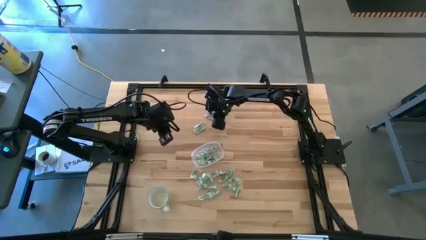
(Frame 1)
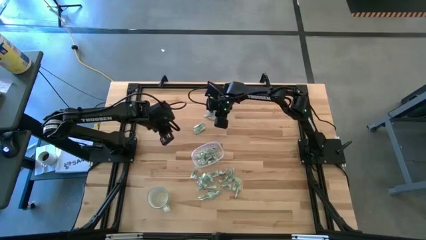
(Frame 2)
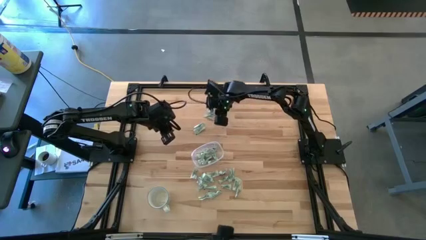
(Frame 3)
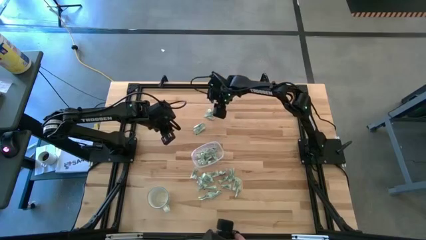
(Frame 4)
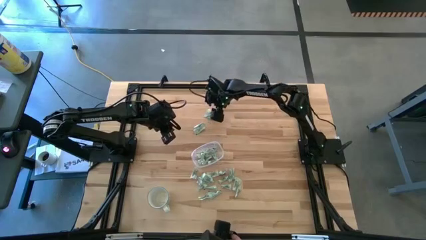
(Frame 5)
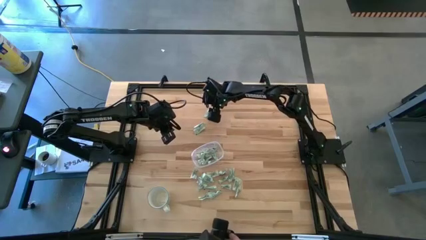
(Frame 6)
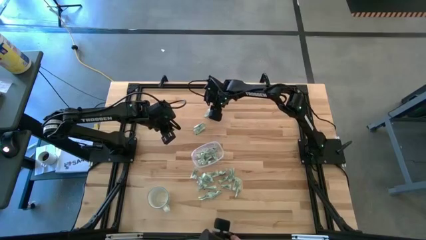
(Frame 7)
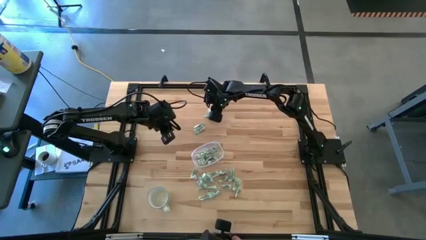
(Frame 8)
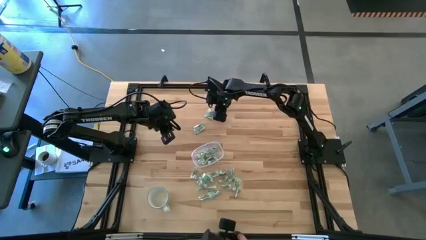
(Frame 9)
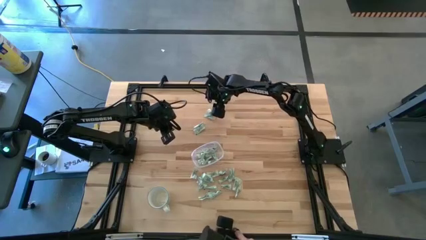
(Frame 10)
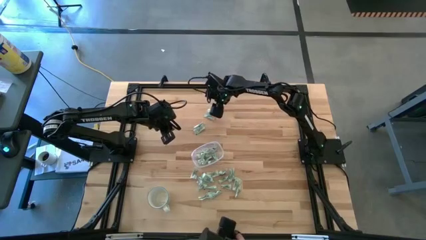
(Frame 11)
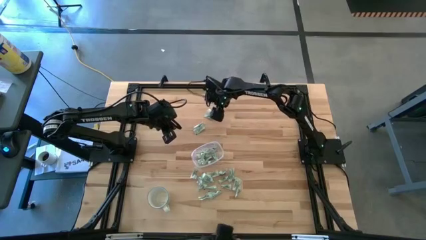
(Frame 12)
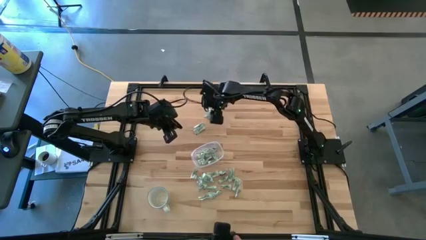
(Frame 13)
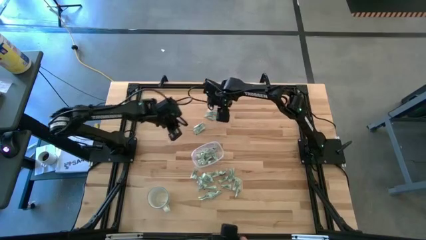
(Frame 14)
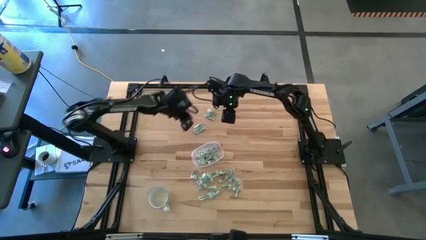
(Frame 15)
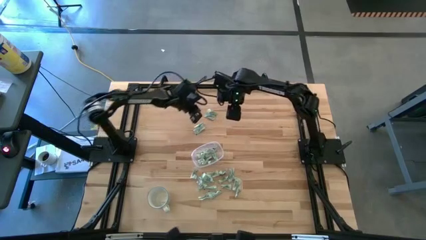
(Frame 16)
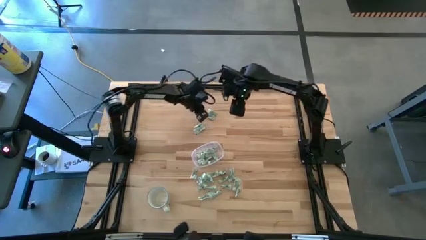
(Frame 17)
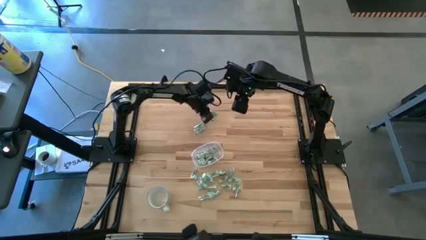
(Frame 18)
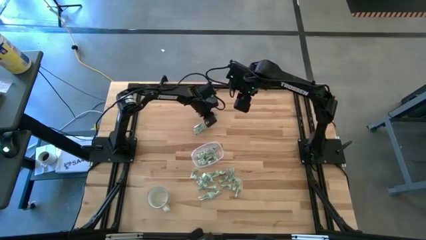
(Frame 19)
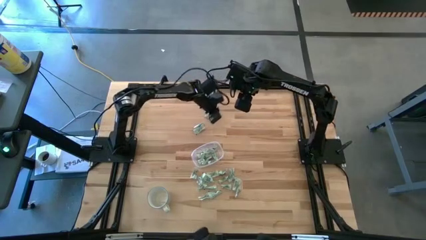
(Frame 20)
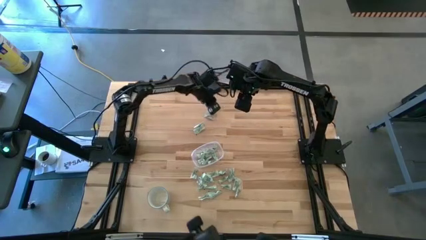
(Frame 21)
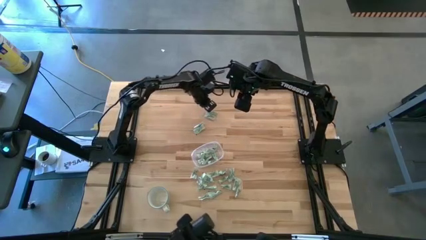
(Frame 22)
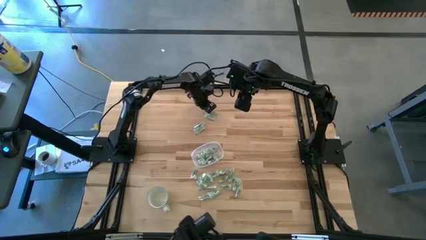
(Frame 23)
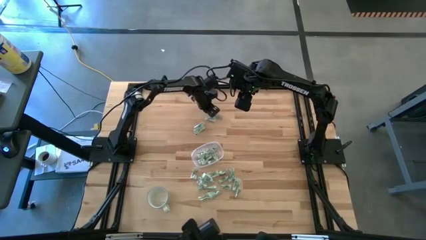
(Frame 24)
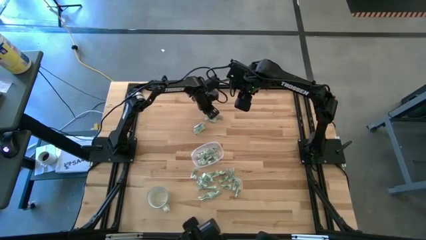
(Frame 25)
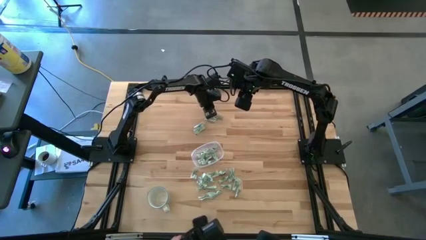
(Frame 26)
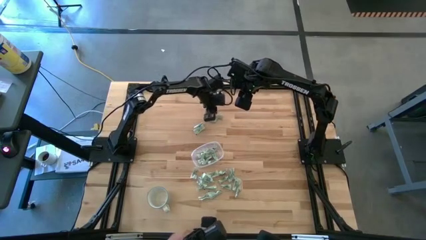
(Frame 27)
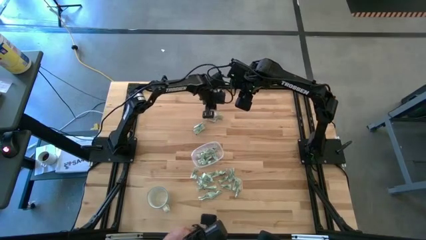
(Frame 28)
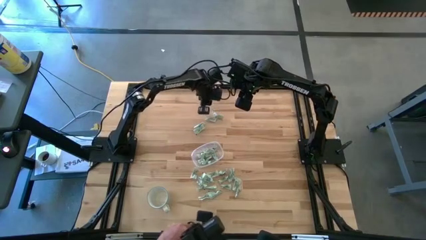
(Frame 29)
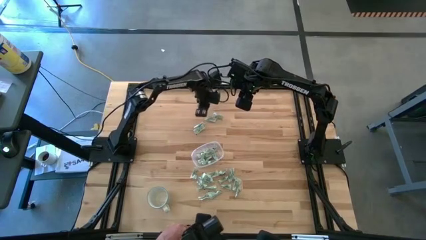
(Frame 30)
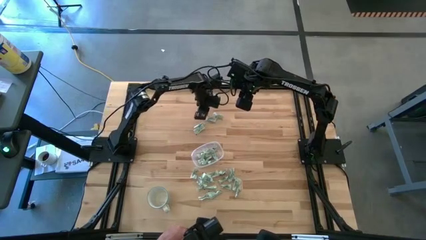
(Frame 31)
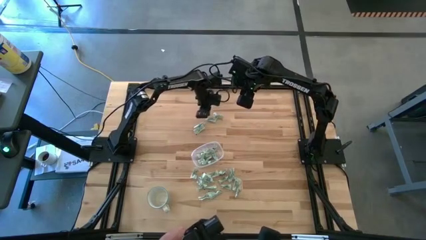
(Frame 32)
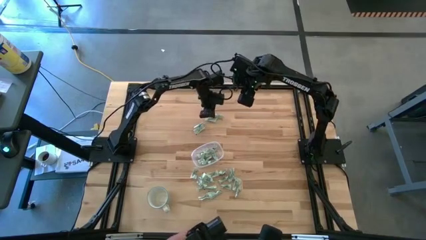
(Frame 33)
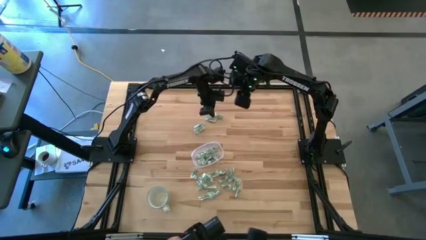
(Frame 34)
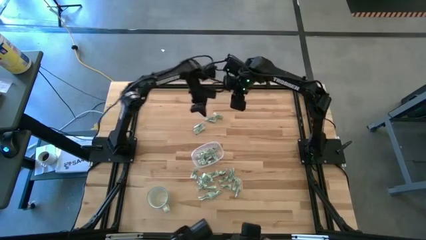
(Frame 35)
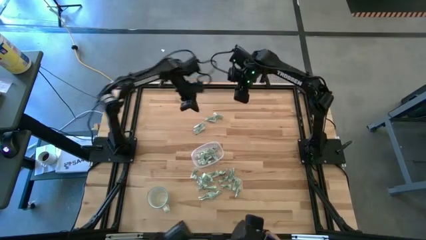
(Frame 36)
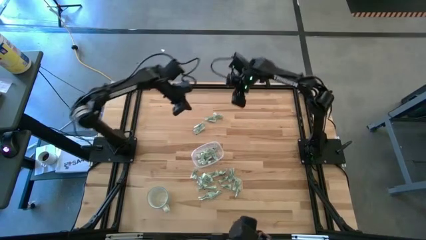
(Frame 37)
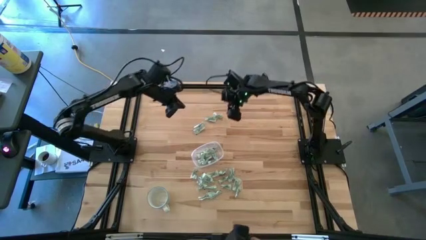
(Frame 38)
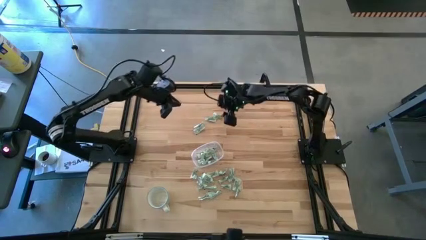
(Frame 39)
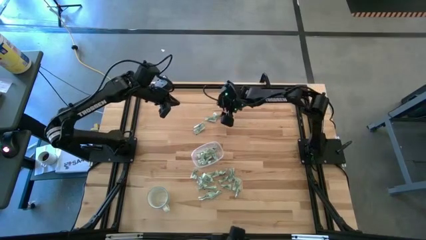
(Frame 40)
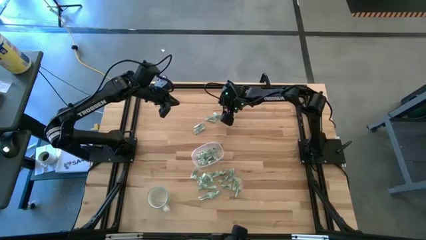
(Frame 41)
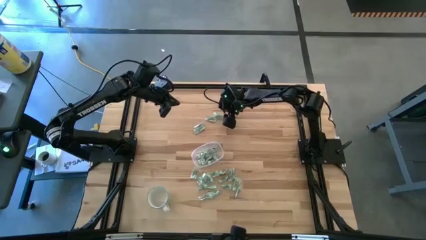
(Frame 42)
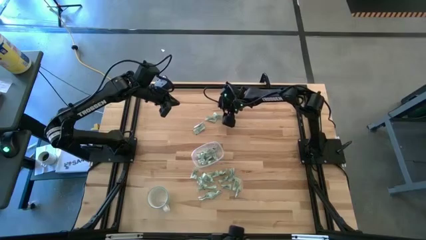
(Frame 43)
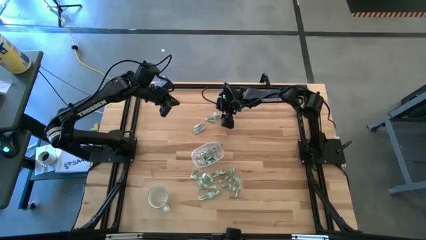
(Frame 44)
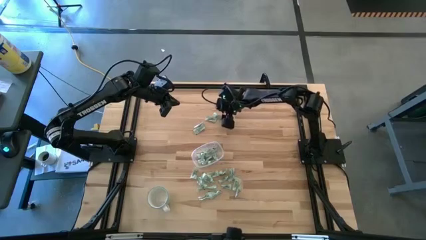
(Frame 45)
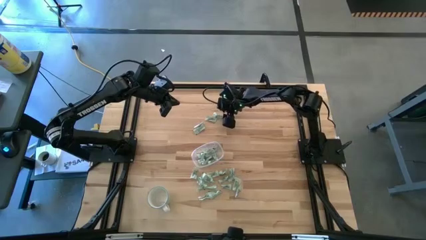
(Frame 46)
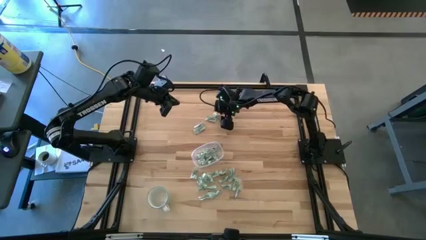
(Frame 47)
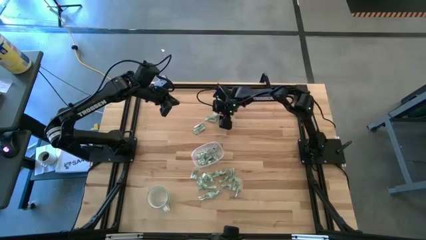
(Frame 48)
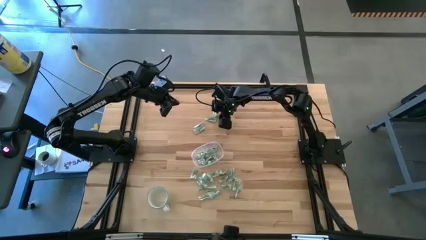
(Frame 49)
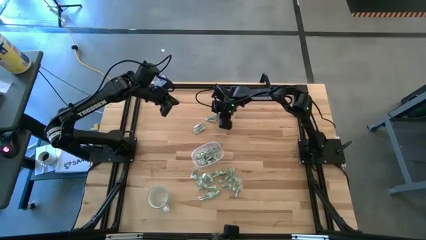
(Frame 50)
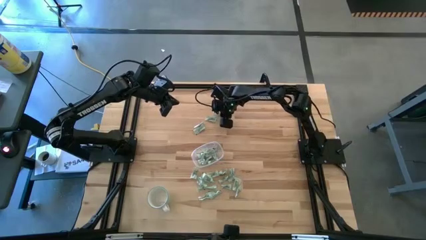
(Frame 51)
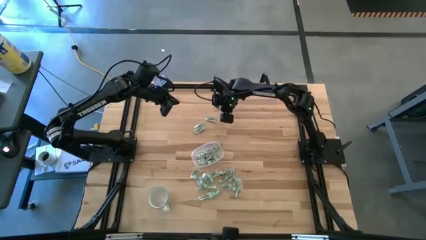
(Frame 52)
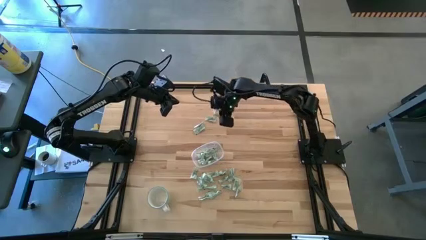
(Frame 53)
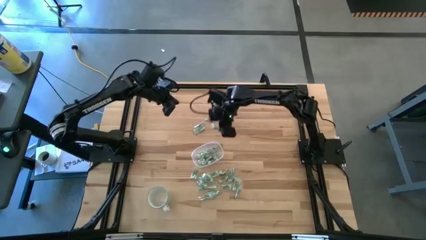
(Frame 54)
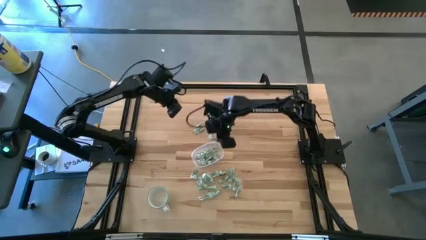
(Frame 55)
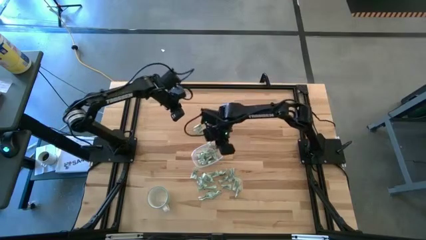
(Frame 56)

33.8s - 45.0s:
Task: Pick and place Stevia / Truvia into bins
Put the stevia packet into the transparent container

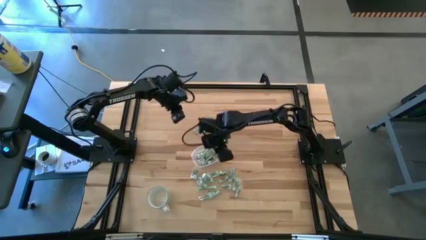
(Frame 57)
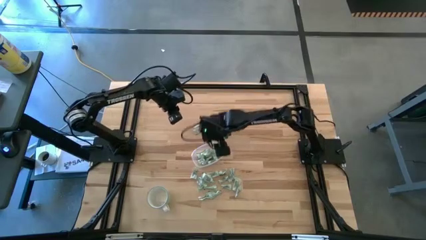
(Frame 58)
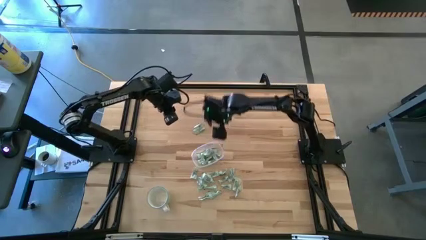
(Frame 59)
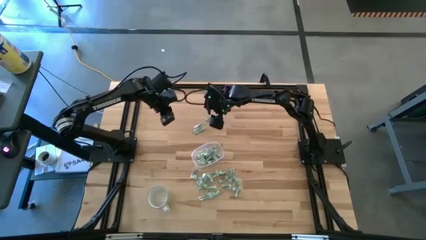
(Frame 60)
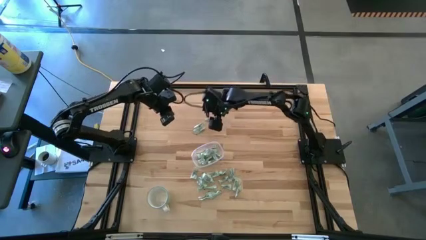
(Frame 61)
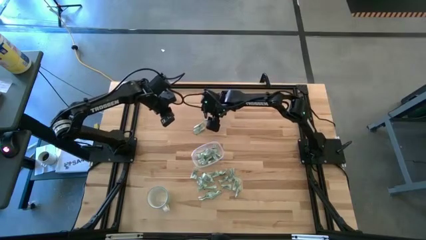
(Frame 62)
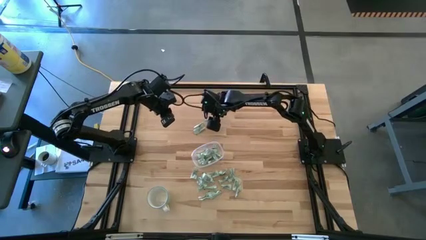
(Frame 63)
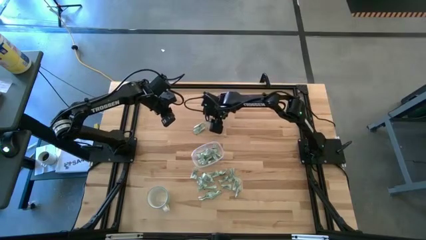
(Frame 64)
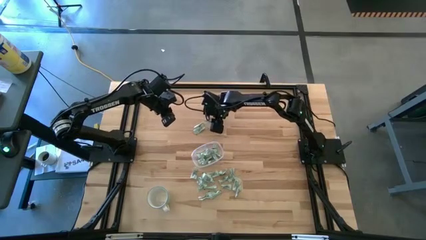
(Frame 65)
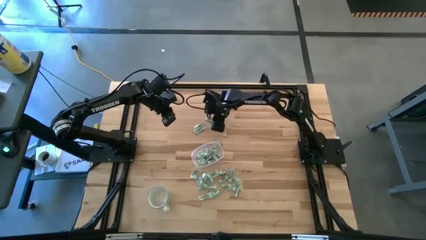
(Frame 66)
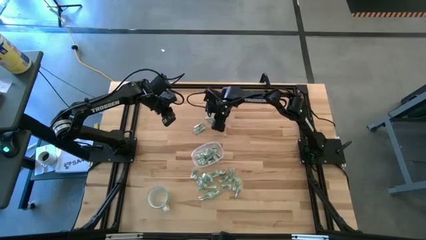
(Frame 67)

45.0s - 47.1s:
Put the stevia packet into the transparent container

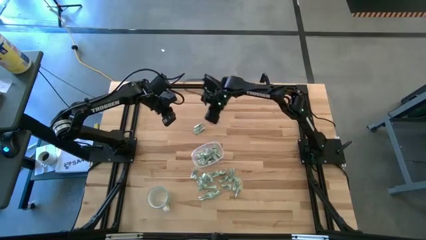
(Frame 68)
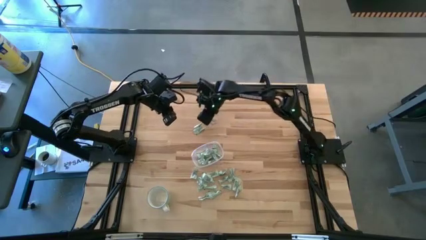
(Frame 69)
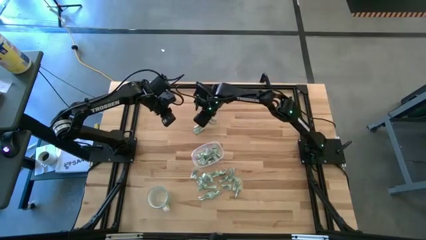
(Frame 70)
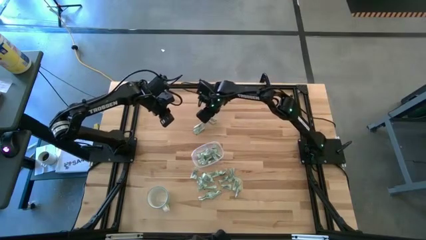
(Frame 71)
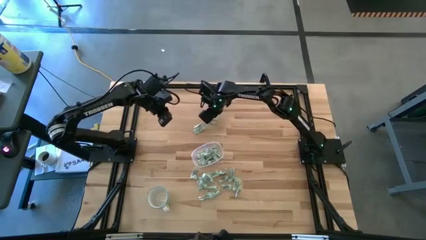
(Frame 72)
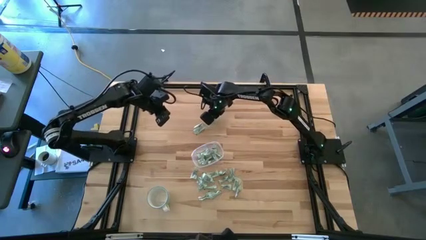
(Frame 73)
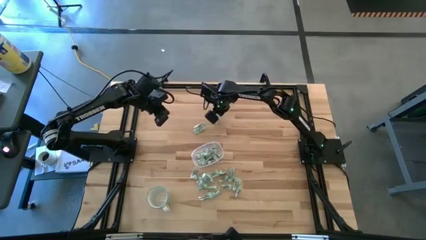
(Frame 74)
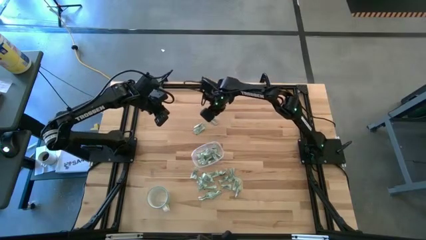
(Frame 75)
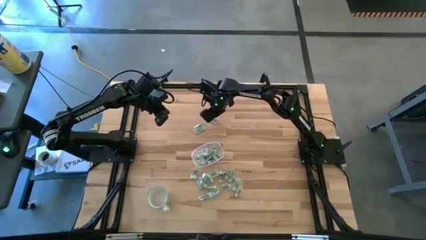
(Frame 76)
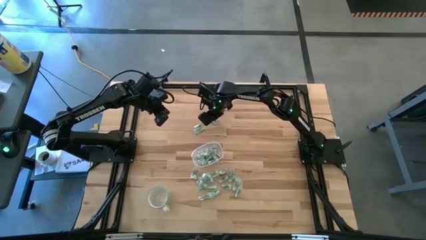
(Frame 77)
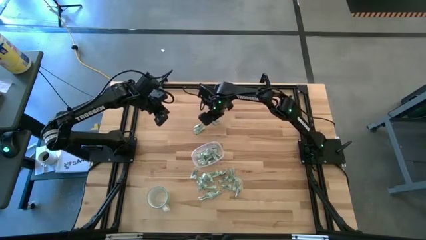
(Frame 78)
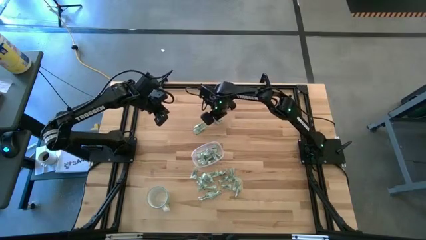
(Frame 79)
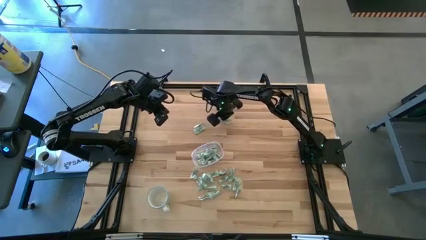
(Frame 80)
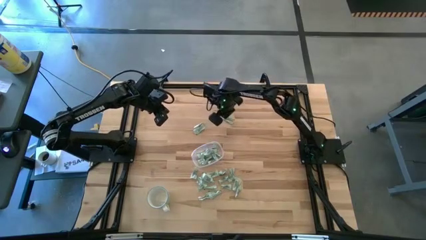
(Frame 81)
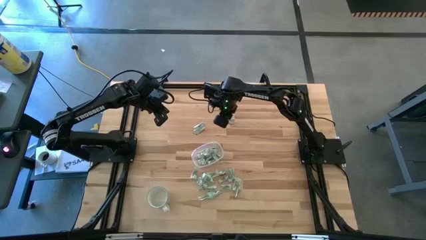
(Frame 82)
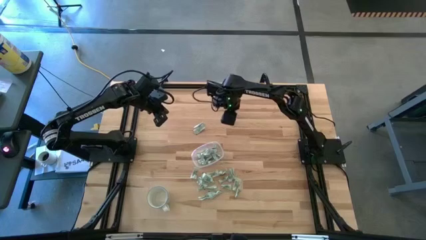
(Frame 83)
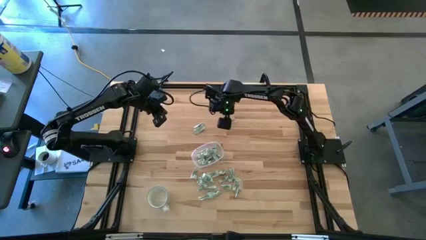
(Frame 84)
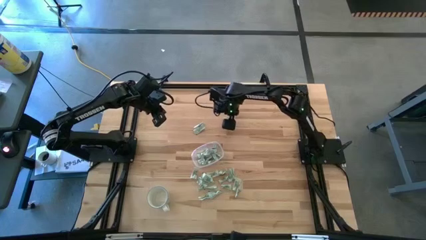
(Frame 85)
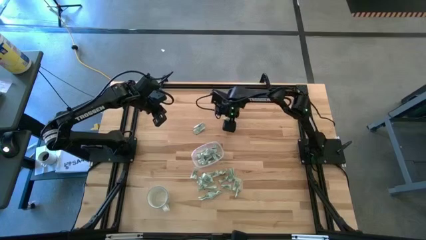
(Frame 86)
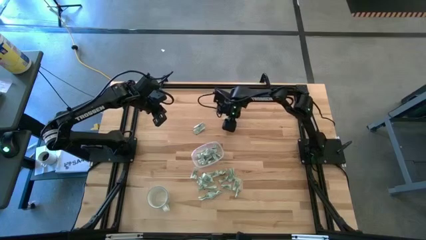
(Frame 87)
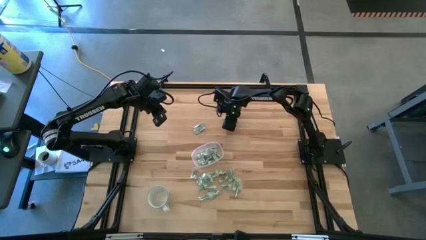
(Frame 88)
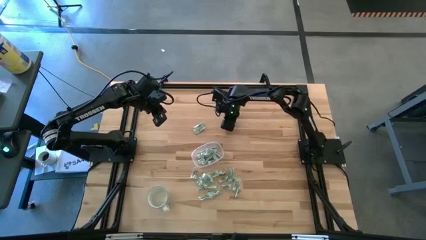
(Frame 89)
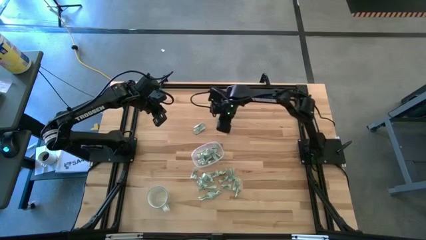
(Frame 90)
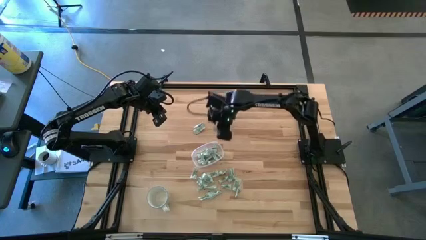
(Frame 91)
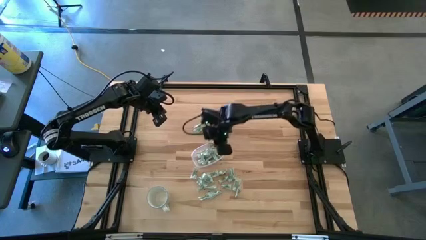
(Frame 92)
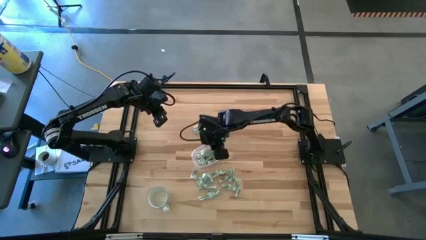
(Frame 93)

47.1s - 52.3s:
Put the stevia packet into the transparent container
